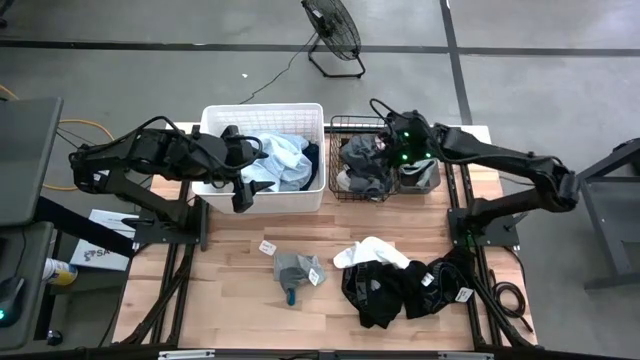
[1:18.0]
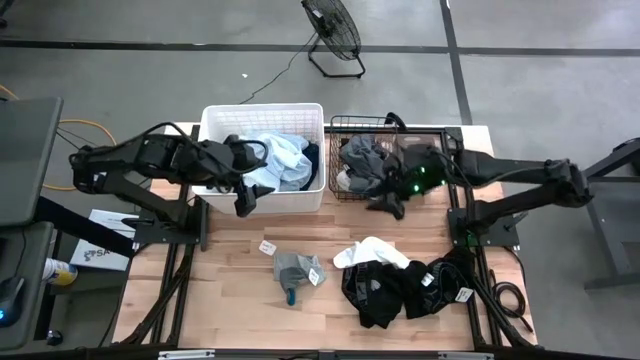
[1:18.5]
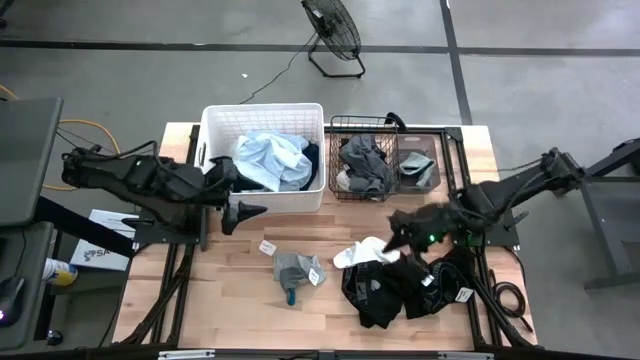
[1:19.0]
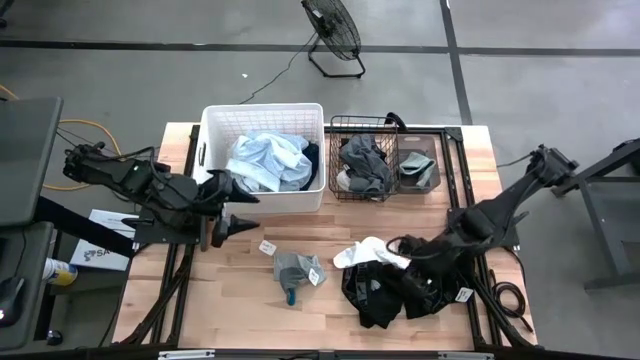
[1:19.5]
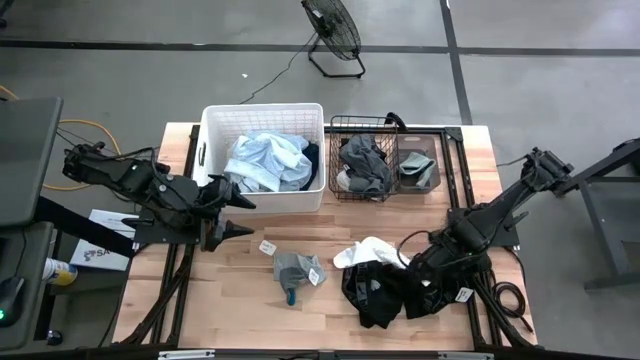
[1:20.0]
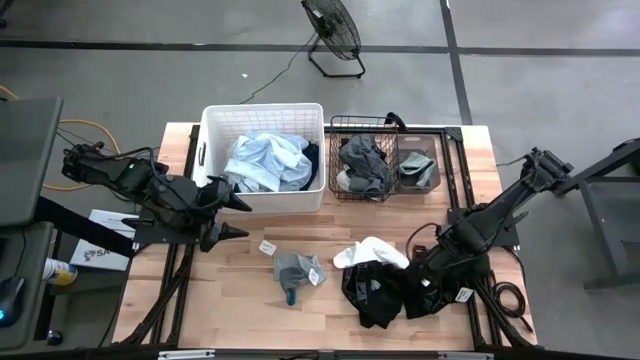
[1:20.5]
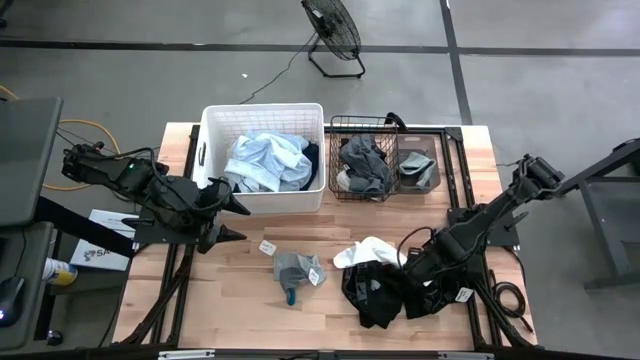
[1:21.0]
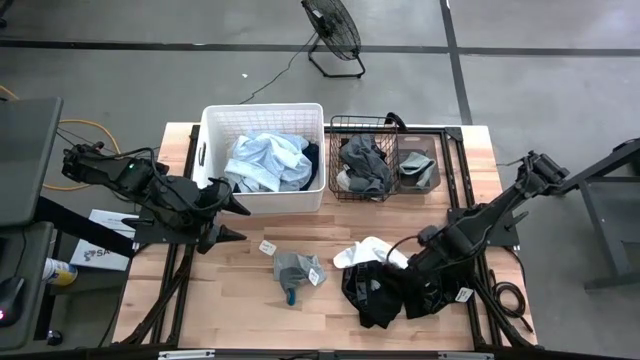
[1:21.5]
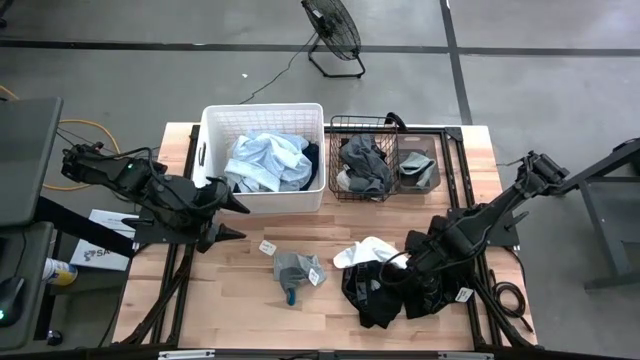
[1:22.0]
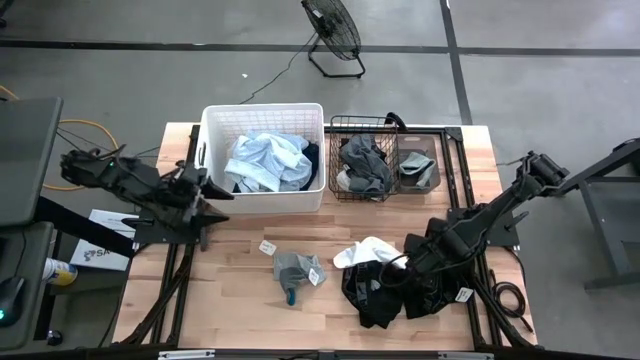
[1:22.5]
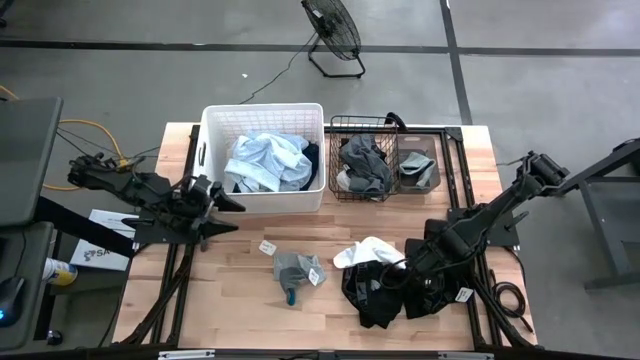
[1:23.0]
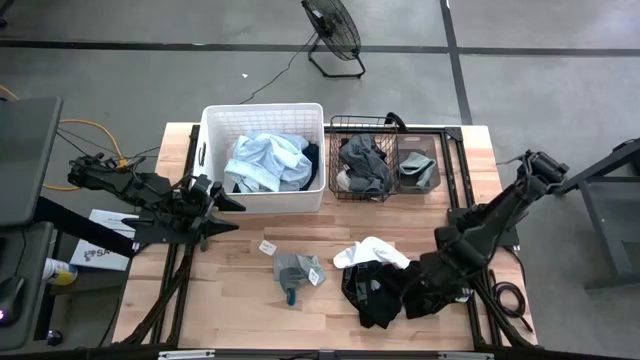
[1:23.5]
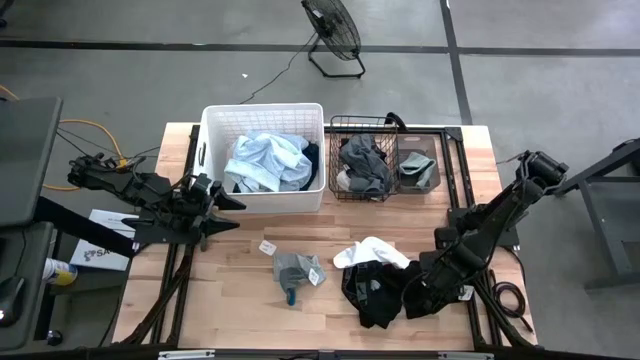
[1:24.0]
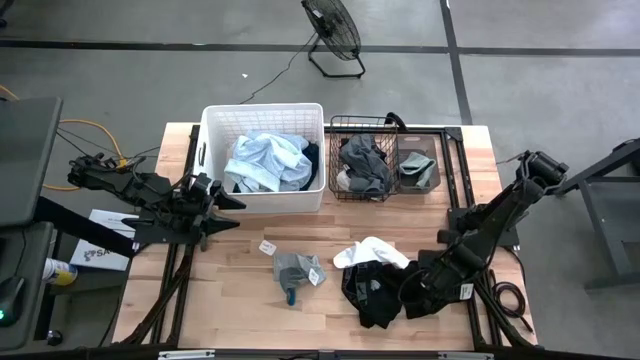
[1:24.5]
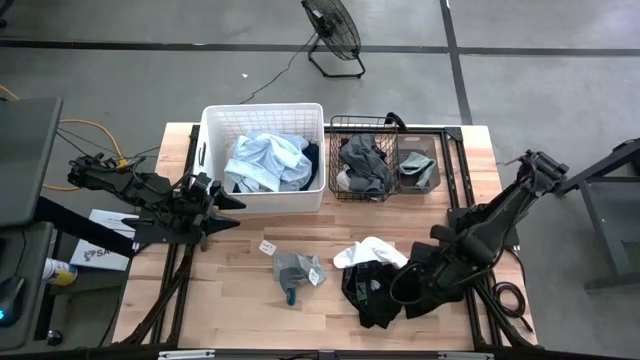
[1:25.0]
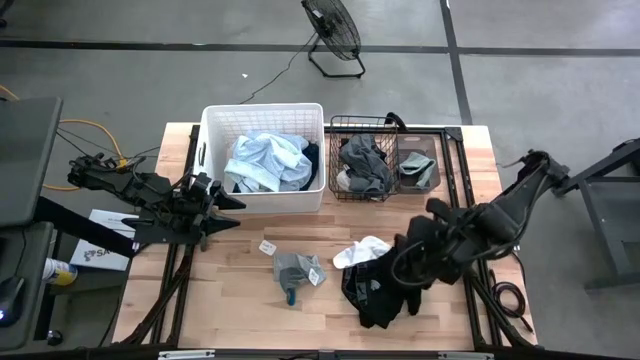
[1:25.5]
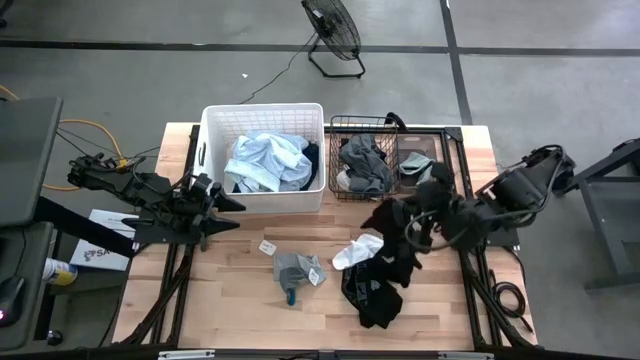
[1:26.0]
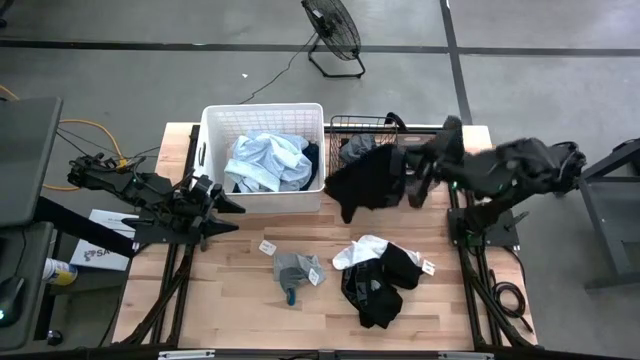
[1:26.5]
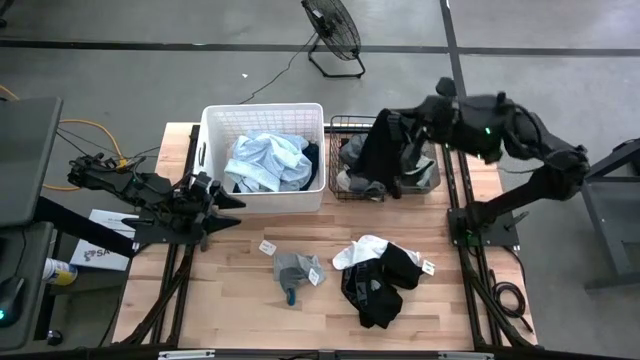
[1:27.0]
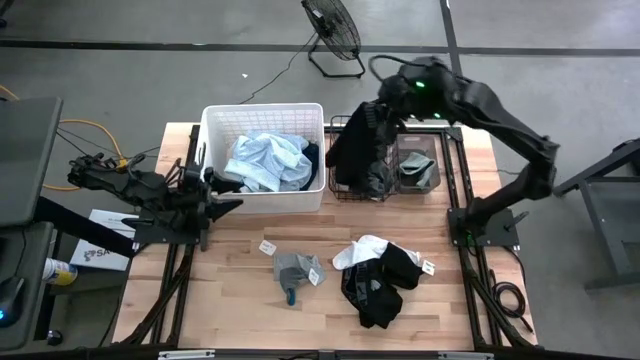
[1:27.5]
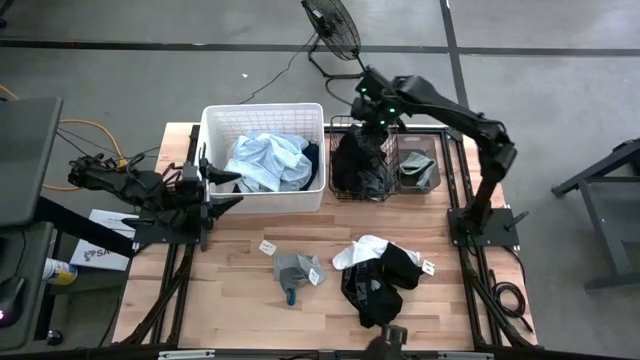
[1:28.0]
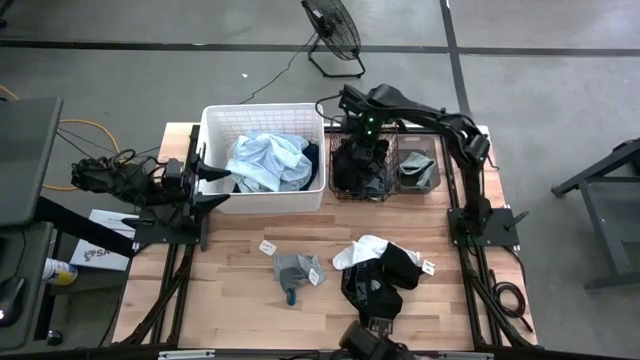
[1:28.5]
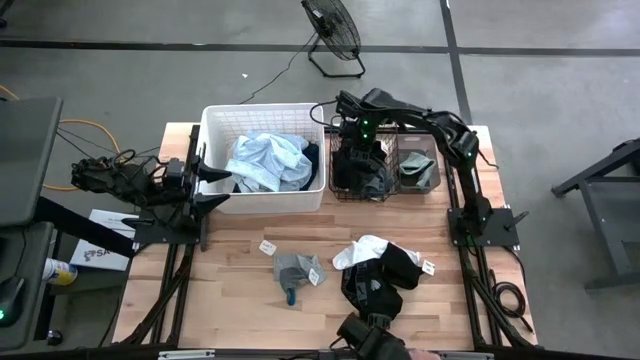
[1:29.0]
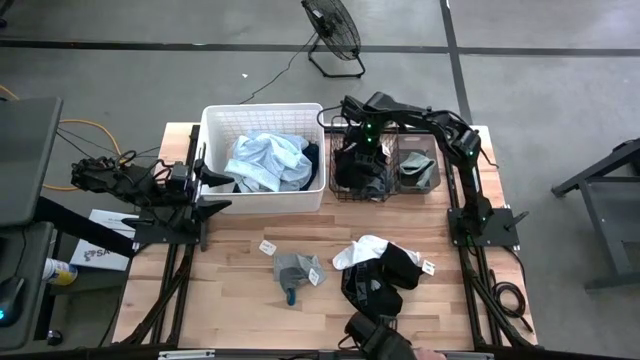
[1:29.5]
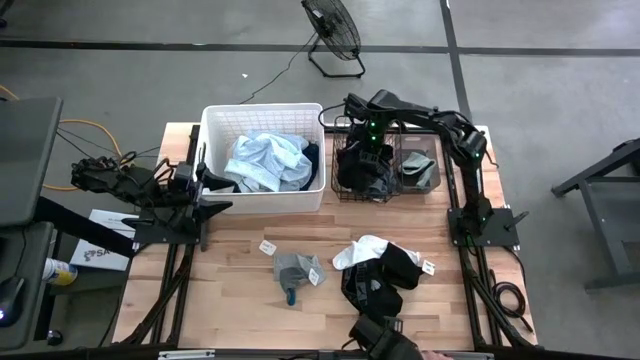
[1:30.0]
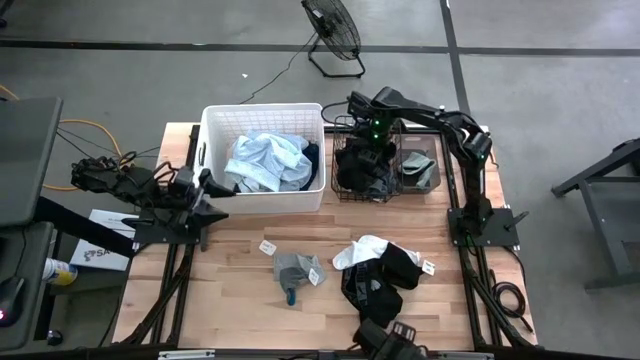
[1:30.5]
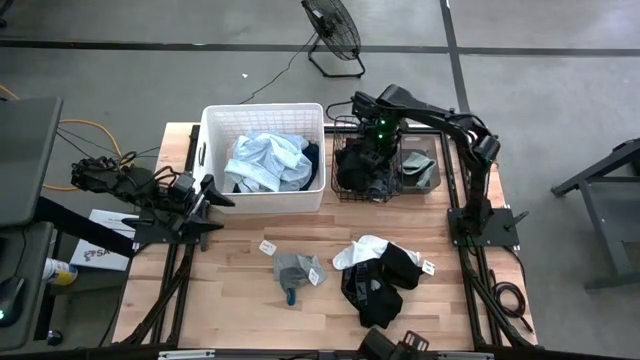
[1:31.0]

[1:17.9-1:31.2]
Task: Pick & Place Cloths
Put the right black underwear into the black wire basket

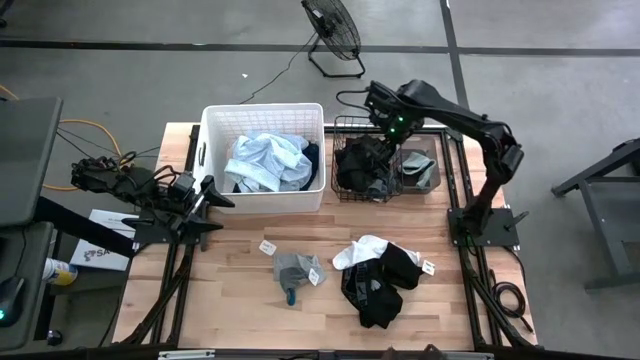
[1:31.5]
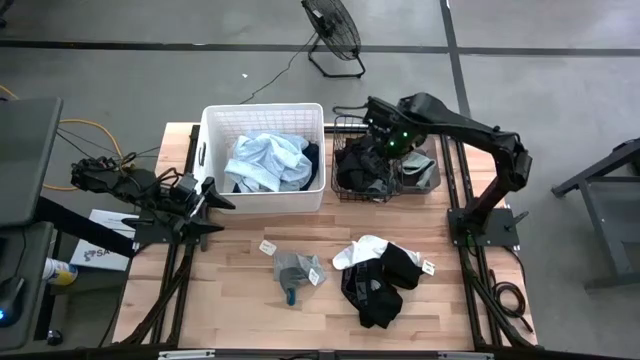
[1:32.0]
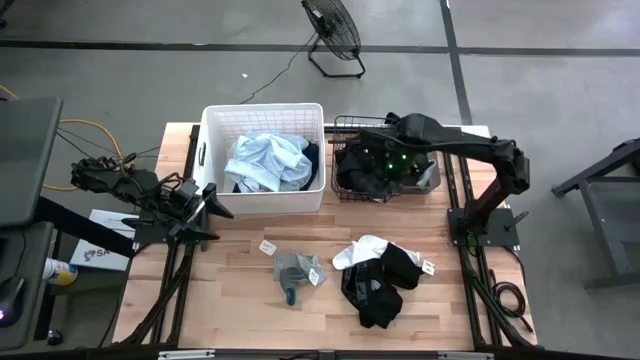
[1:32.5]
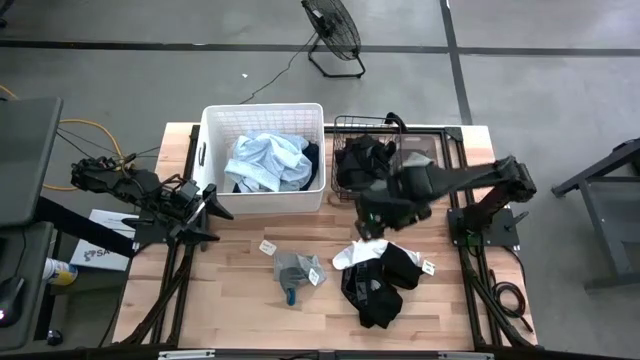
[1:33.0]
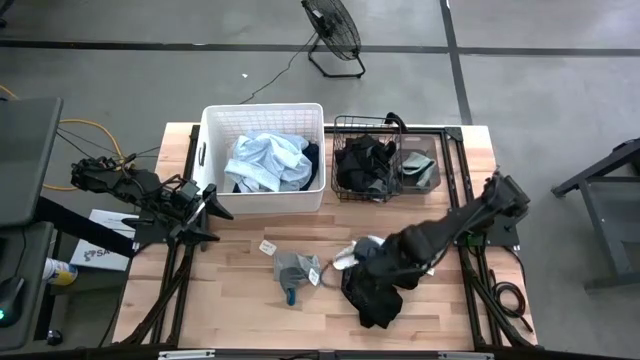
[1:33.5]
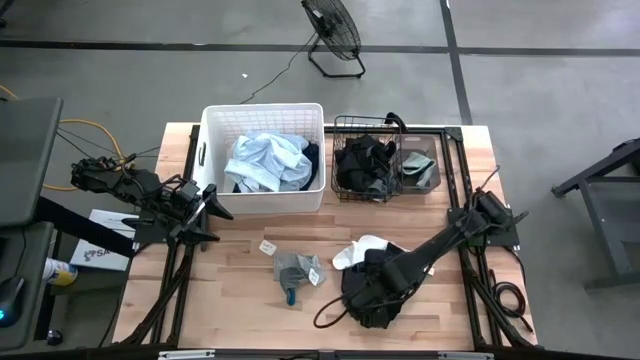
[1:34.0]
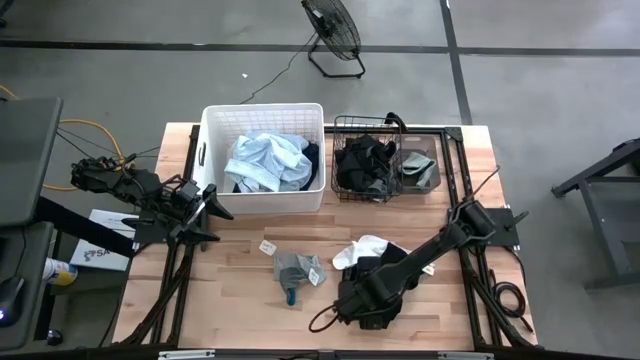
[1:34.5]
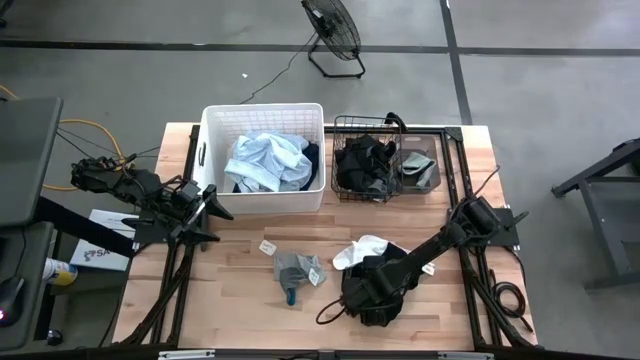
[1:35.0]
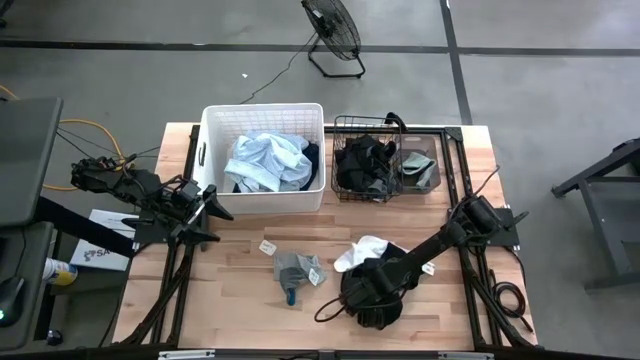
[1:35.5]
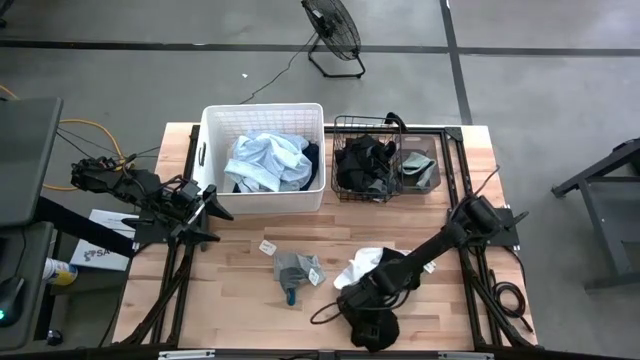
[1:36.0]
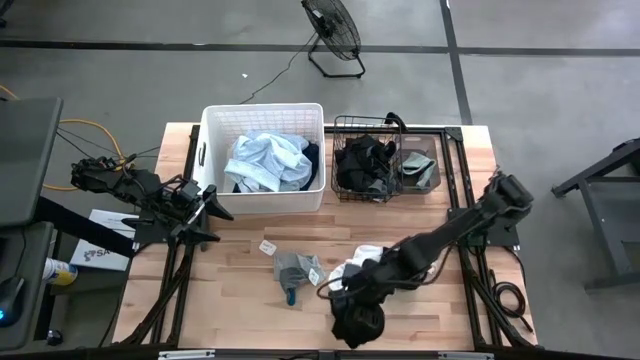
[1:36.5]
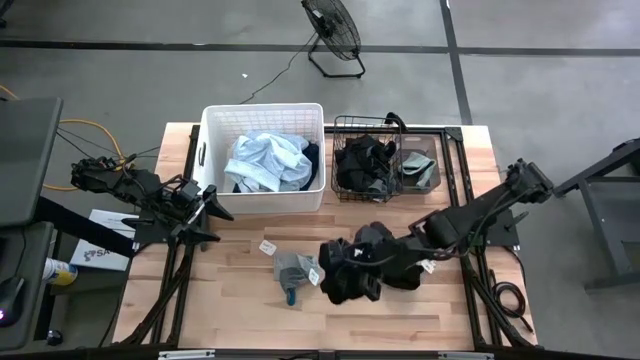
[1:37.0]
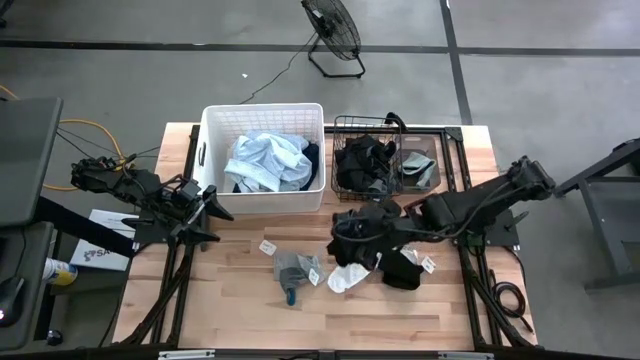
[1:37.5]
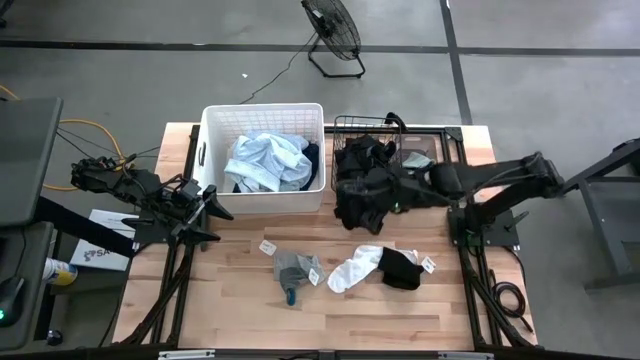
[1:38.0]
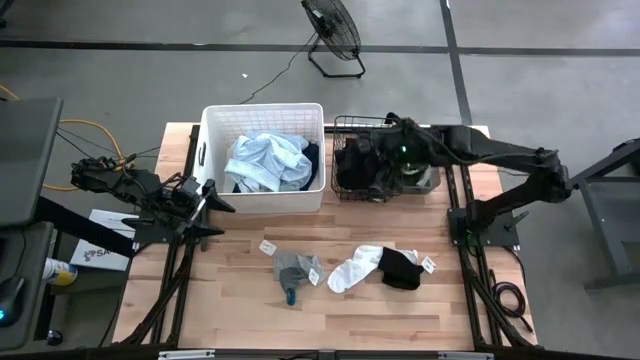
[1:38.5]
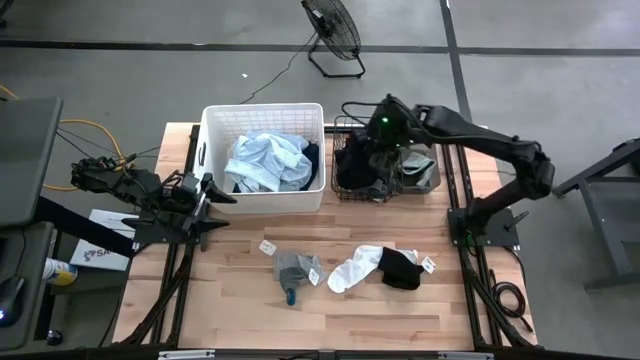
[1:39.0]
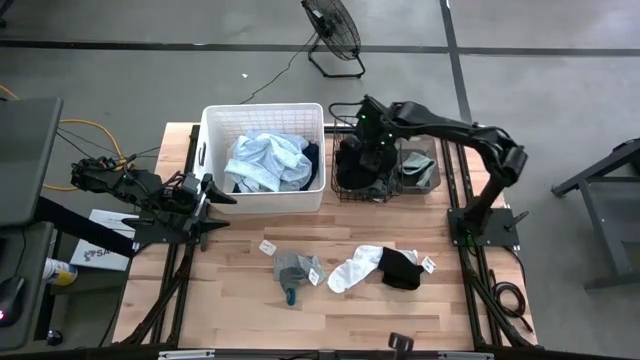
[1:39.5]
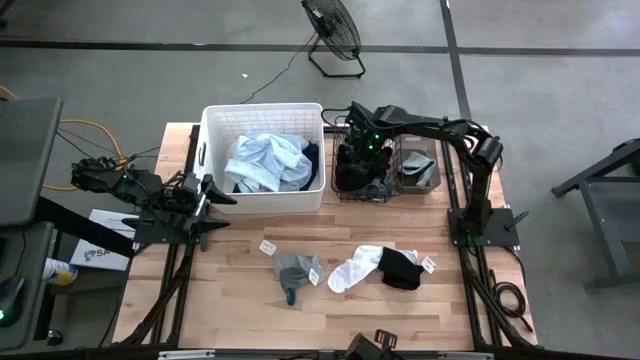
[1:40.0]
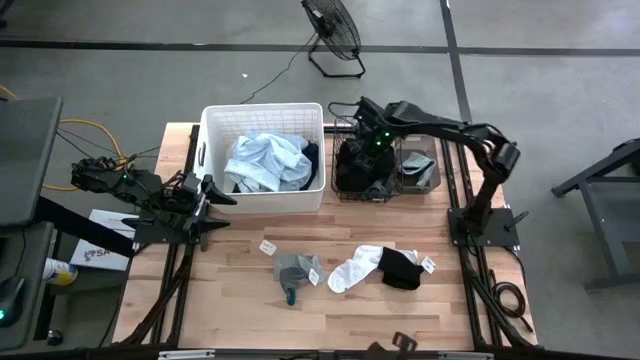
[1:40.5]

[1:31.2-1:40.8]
Put the black underwear into the black wire basket
